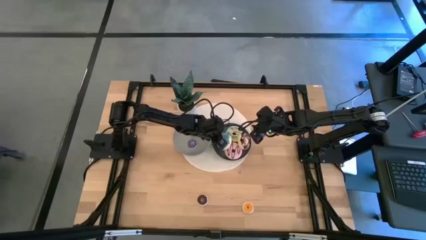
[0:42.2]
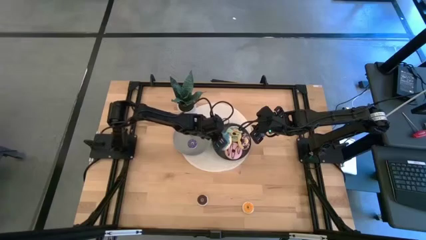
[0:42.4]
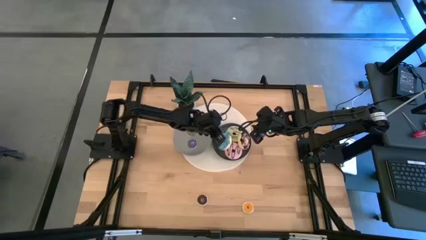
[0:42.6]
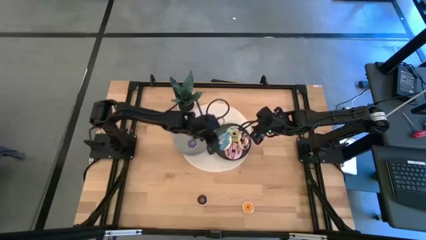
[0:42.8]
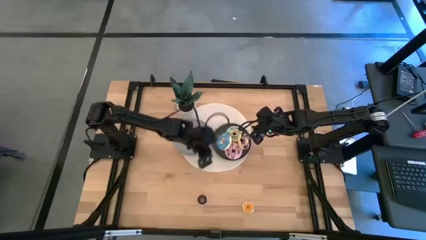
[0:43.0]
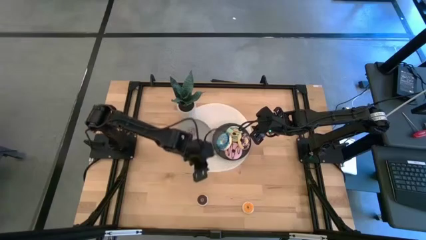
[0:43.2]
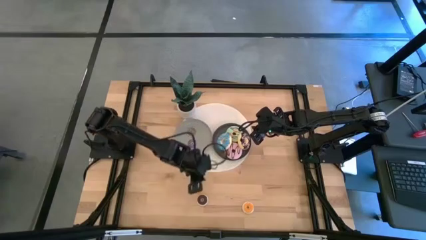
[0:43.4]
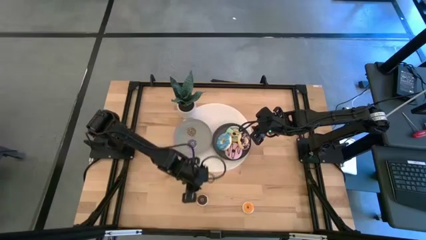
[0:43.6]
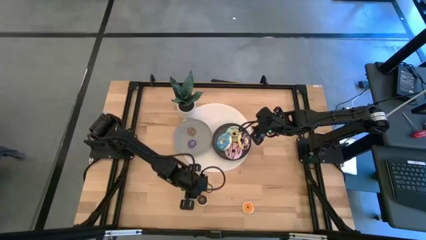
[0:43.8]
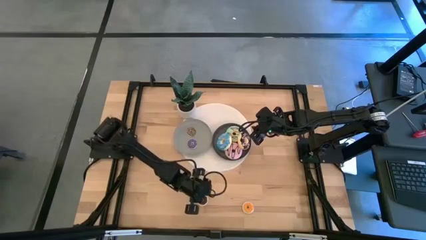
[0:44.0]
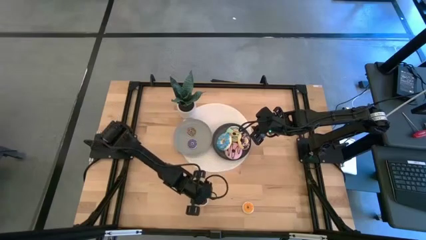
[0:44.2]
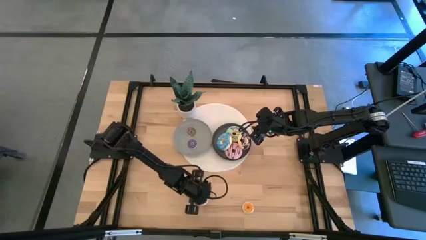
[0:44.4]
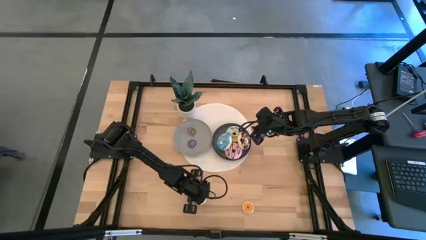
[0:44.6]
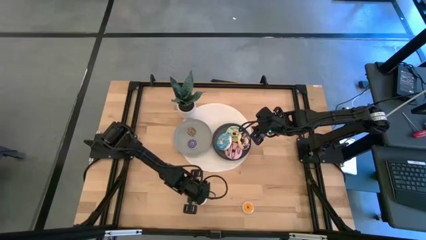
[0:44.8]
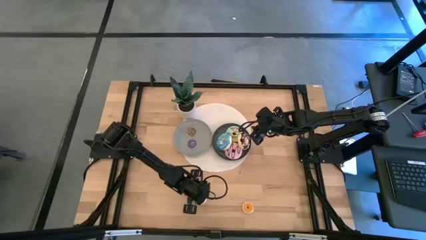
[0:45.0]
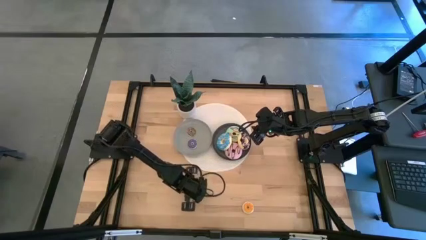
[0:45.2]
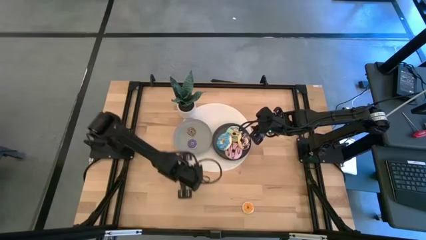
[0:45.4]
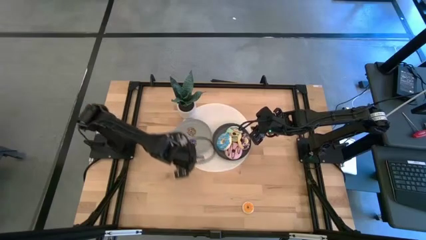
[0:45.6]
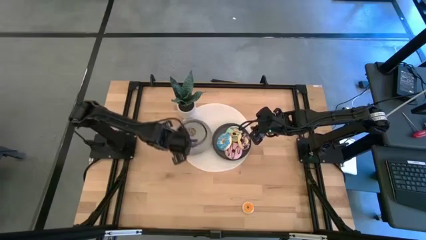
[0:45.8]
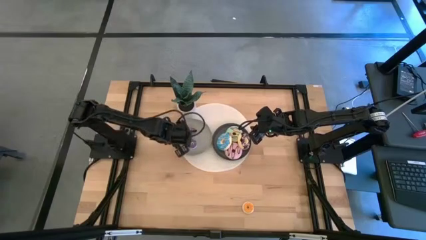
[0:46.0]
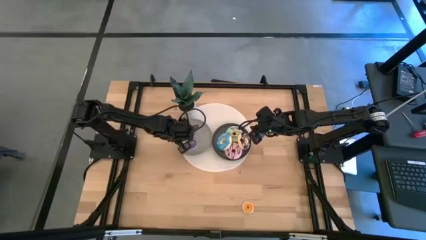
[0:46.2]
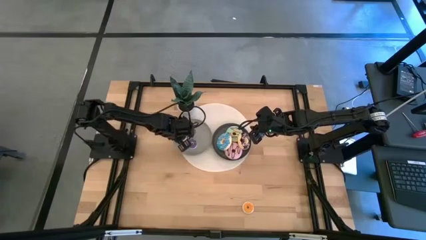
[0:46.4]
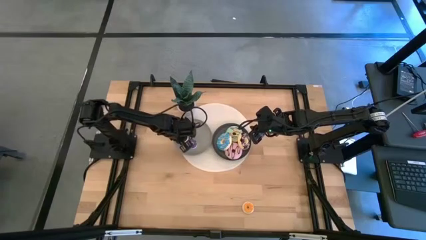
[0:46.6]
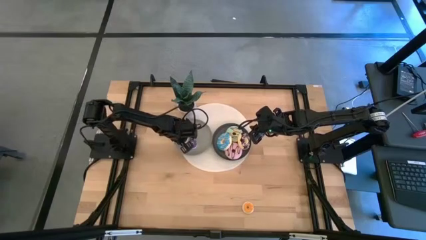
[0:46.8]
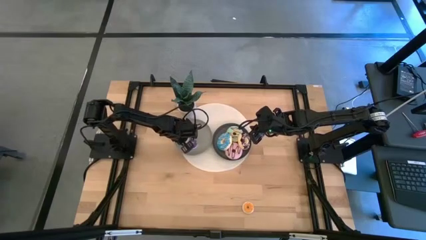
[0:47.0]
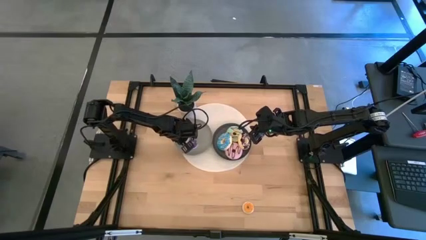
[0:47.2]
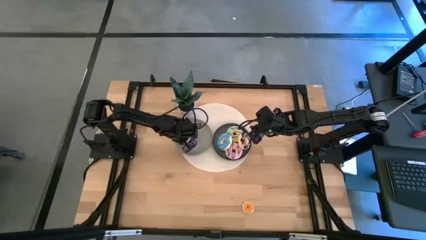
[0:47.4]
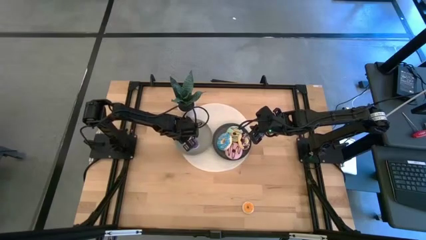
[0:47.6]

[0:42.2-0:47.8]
Task: Pick & Place donuts
Put the small black donut on the gray plate

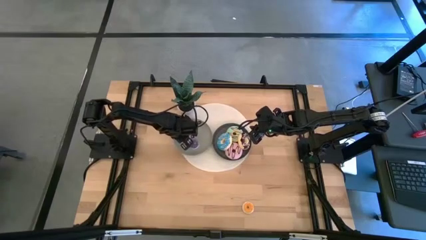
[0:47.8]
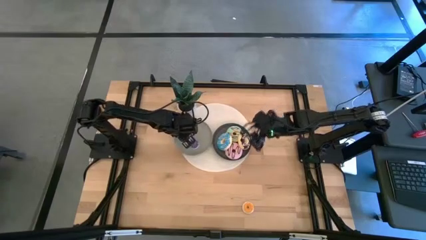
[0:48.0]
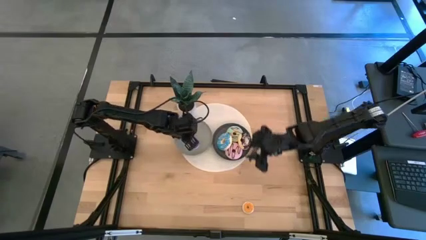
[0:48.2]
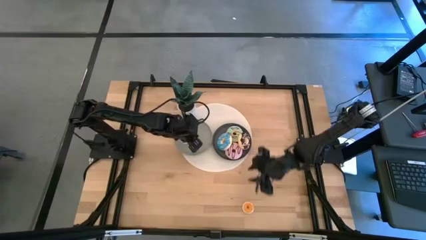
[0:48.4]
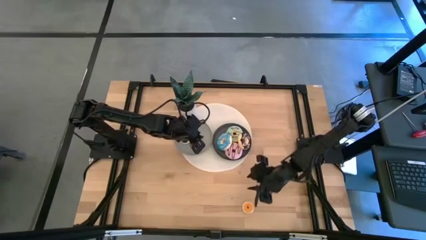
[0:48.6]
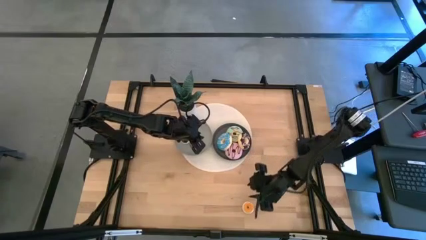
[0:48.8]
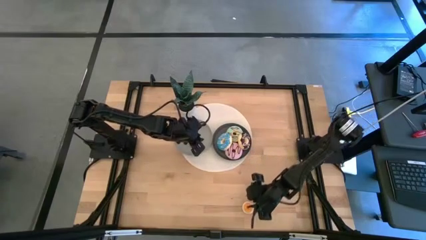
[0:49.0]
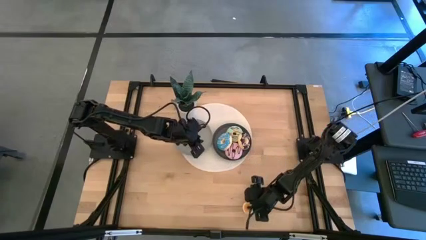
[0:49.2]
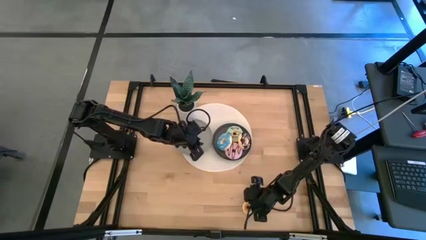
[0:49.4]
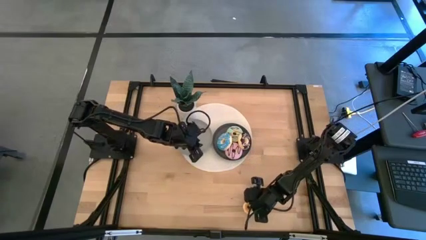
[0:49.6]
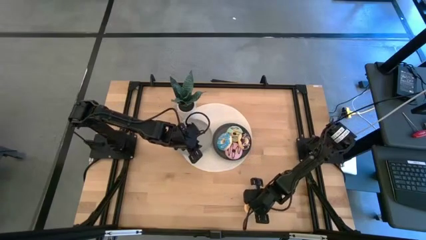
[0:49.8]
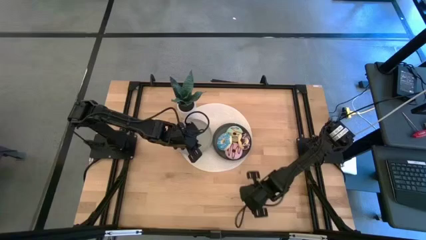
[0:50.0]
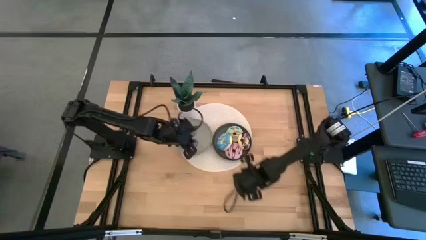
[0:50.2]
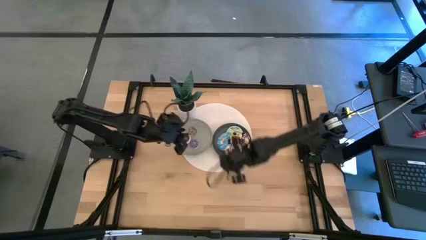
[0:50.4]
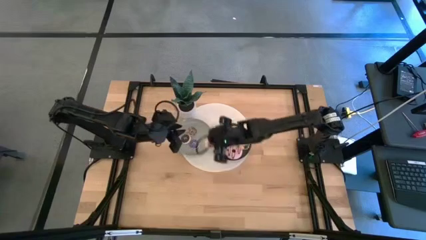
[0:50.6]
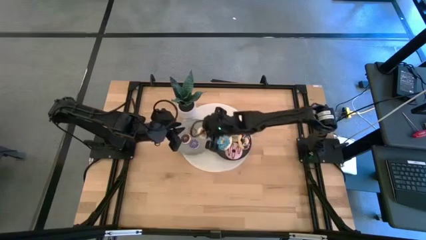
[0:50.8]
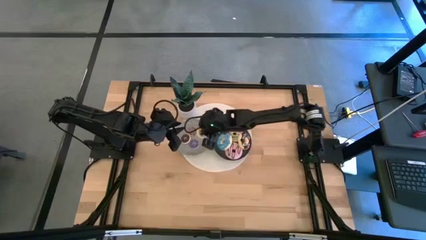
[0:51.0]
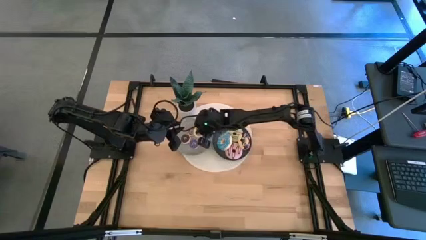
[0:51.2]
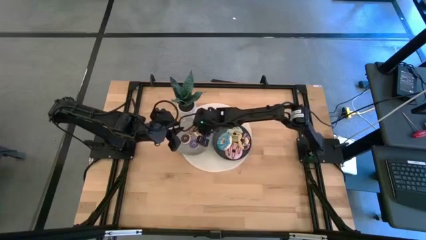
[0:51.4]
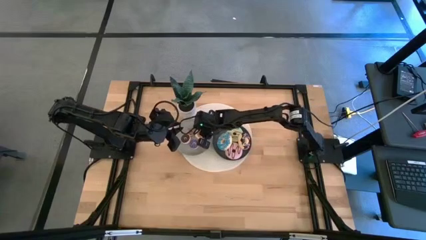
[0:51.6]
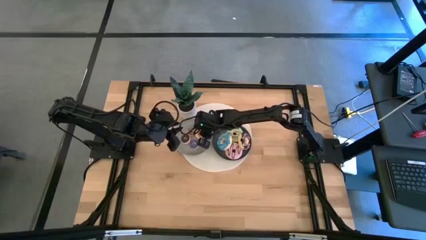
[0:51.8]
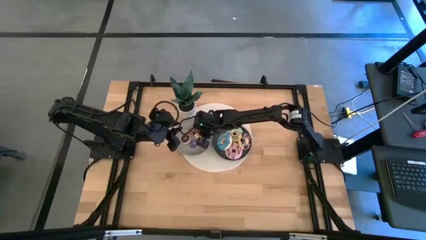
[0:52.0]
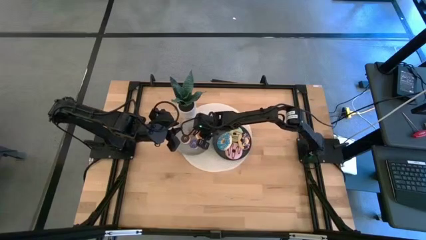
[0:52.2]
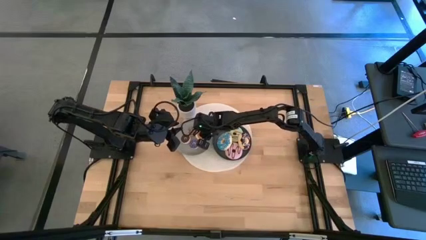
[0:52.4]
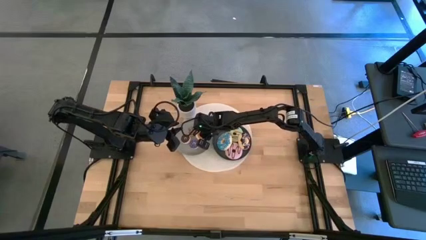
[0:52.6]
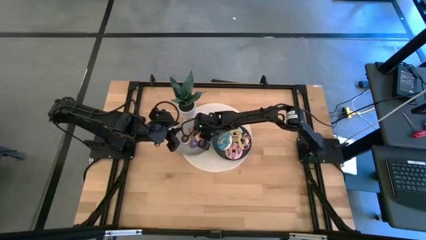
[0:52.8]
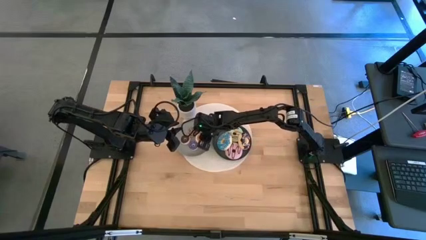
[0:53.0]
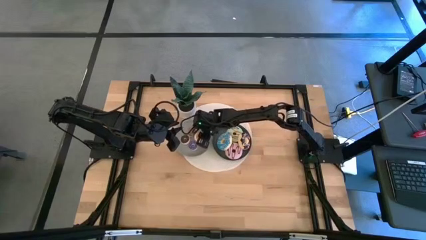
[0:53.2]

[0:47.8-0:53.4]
Put the small yellow donut on the gray plate

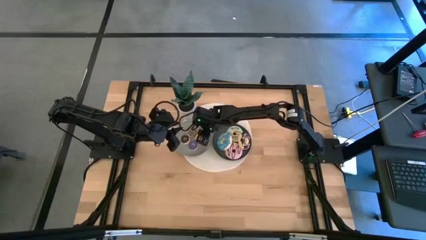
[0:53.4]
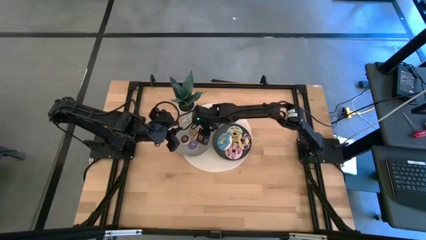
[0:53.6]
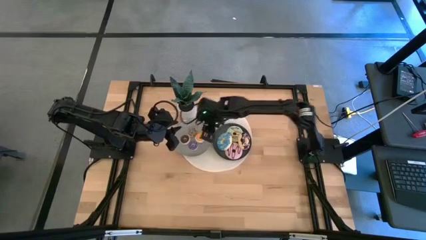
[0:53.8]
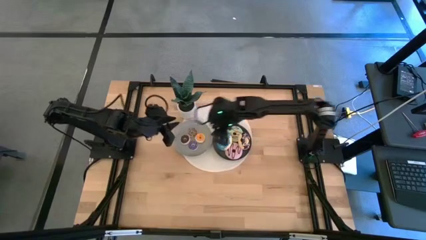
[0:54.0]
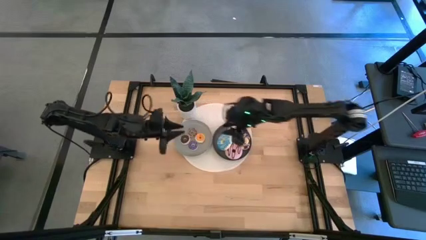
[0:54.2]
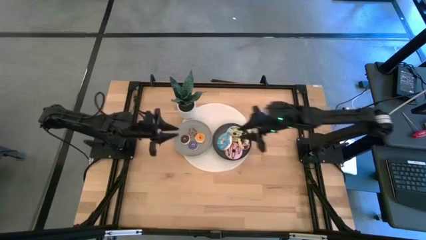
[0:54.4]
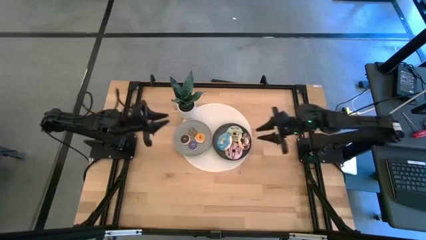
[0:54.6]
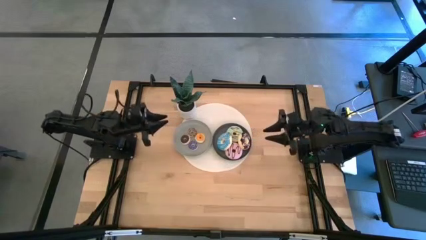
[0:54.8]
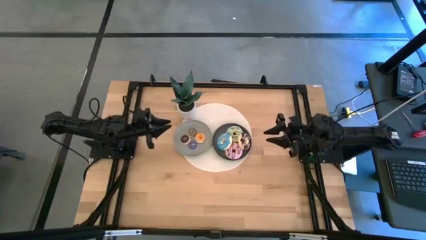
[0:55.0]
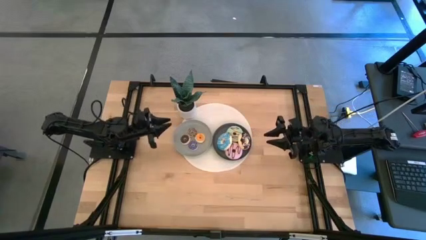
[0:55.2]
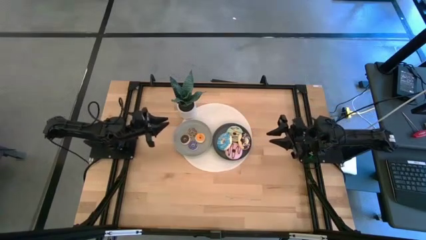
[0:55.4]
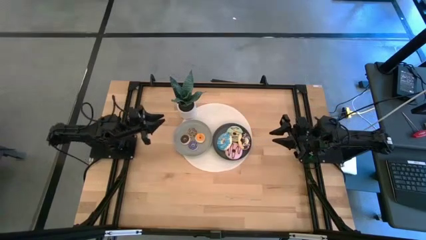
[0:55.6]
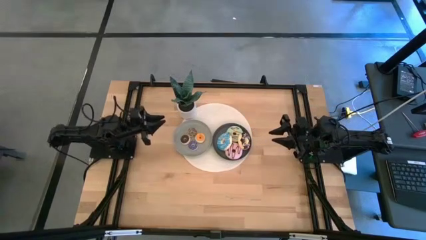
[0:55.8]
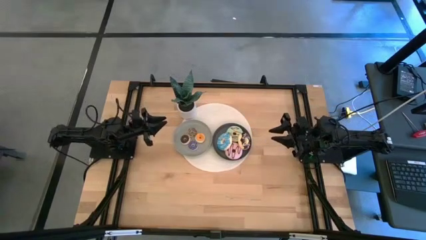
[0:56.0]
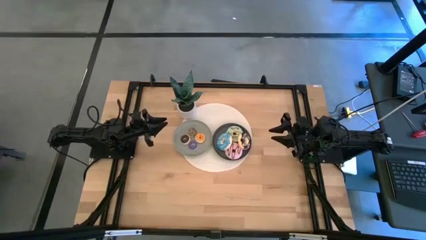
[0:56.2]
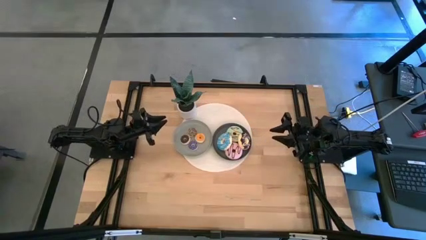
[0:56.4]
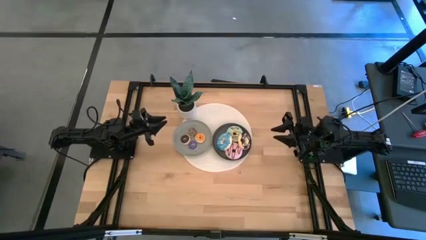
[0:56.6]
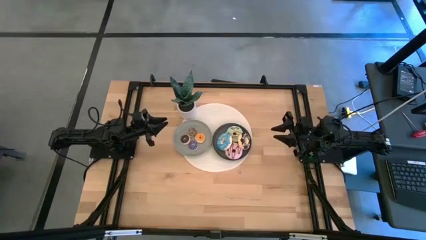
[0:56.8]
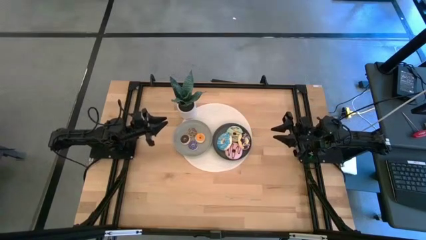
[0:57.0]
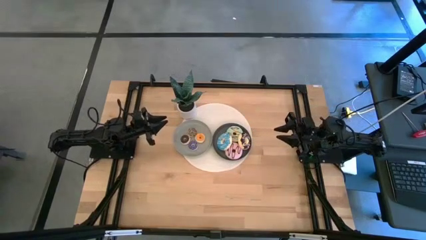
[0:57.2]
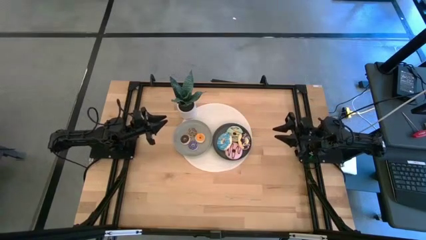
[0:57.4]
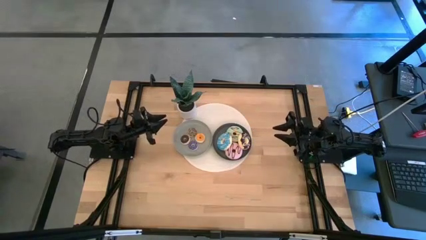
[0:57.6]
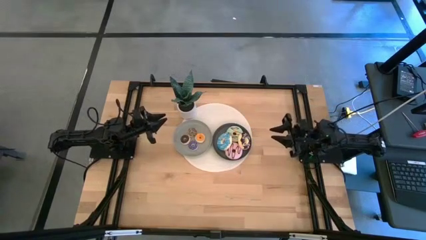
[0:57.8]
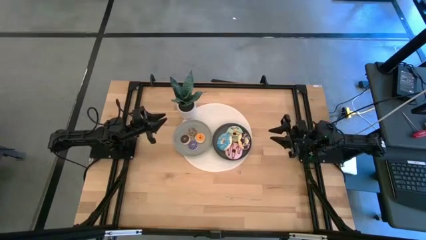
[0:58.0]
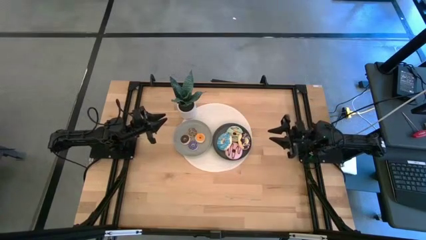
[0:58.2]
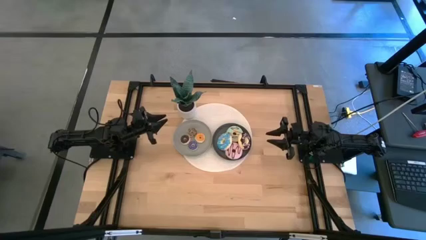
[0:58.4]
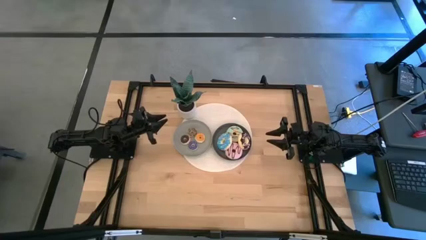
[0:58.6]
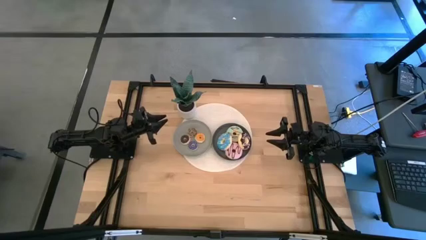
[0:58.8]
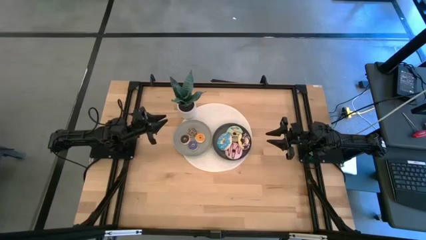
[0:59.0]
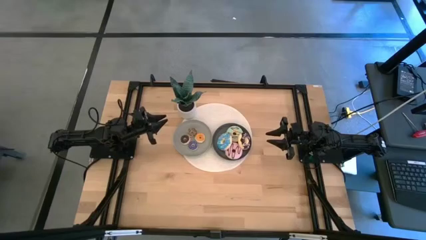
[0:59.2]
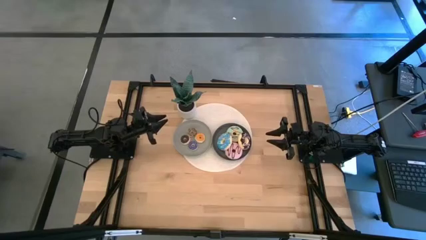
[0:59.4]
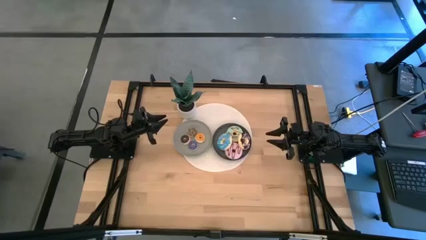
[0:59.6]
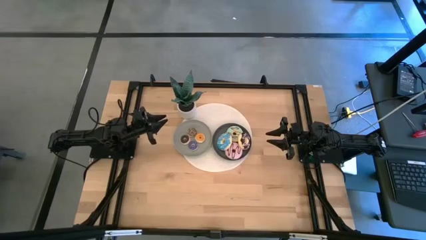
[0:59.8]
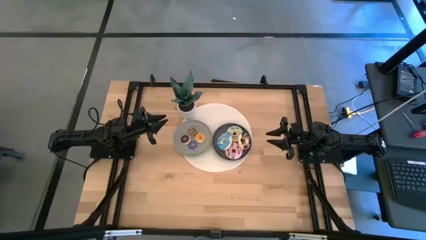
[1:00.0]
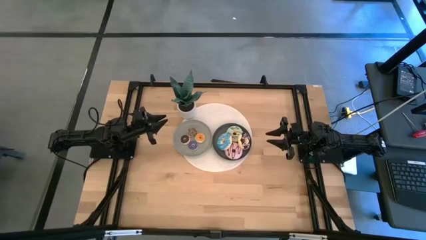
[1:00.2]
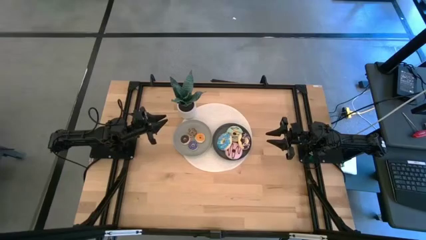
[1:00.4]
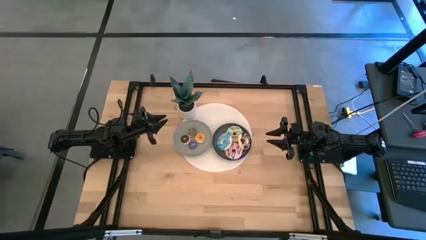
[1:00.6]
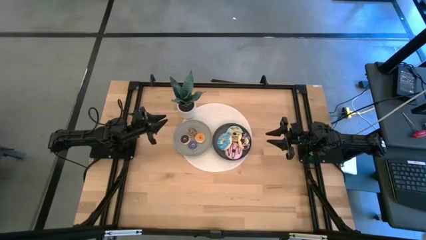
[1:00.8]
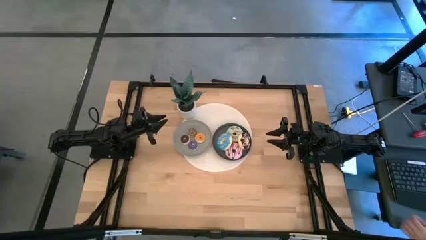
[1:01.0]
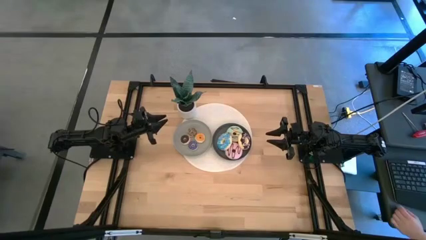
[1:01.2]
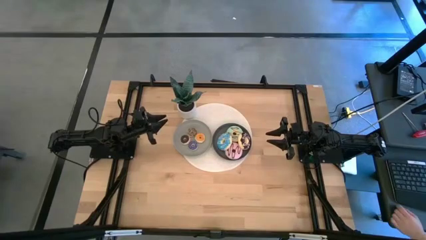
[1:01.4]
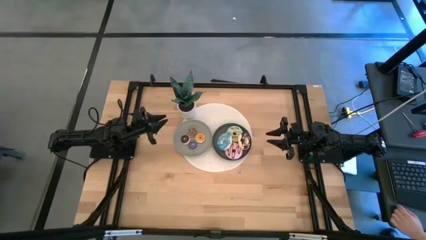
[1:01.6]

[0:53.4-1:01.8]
Return to Home Position
